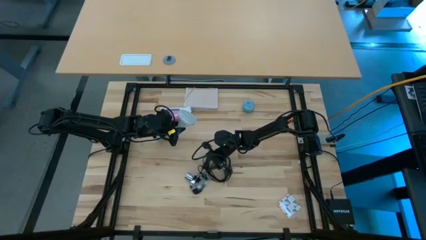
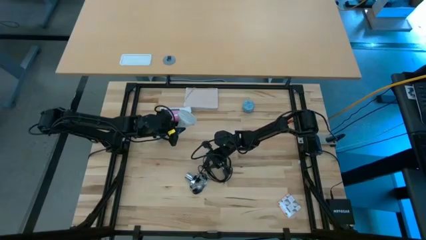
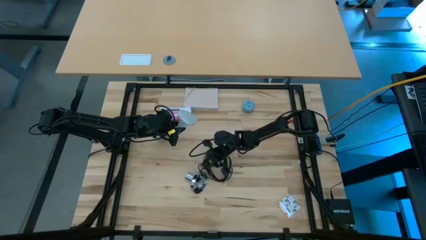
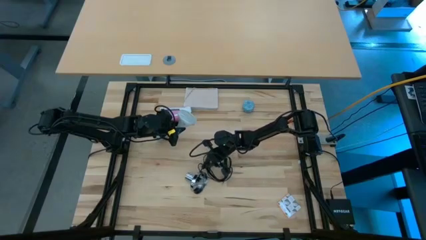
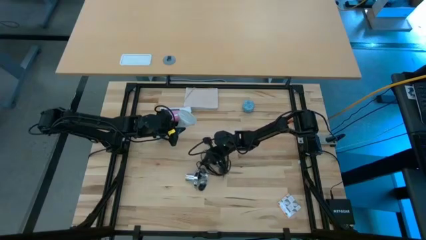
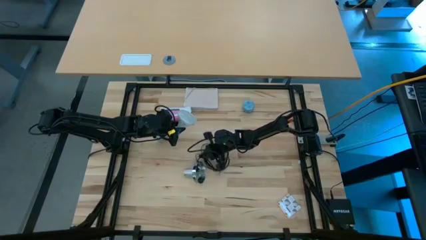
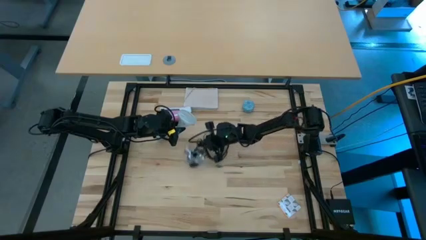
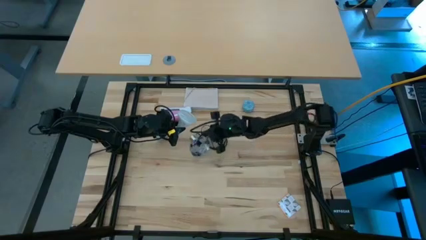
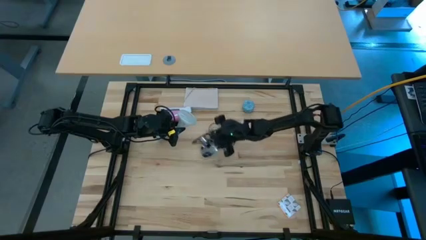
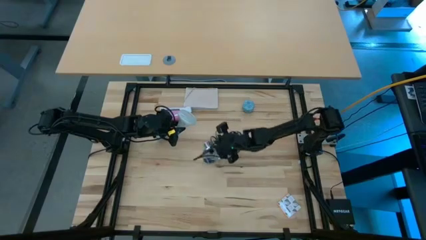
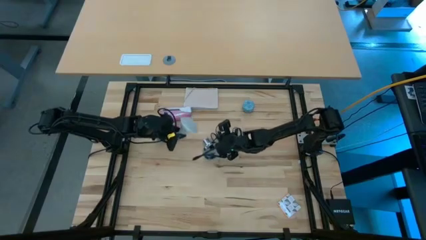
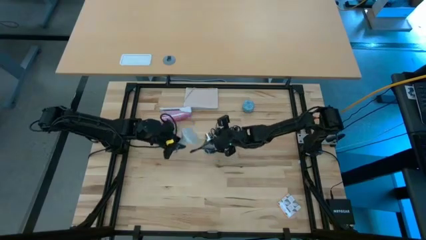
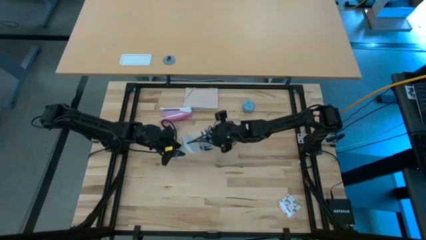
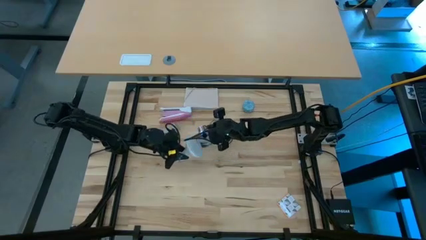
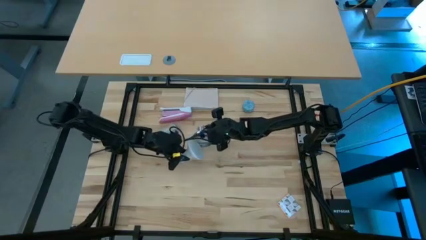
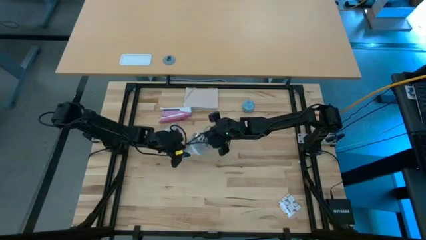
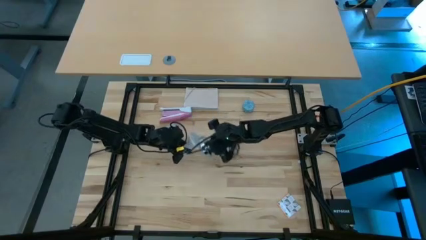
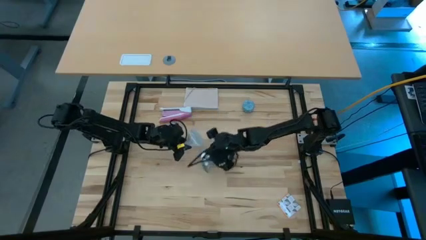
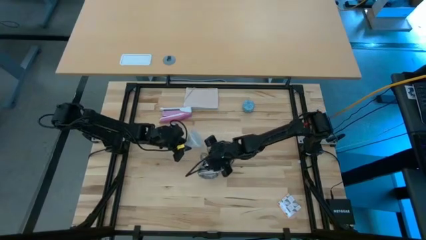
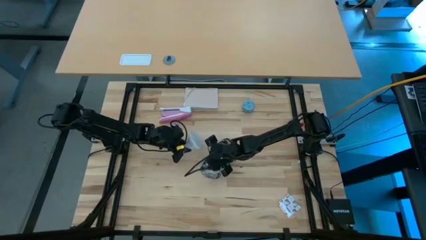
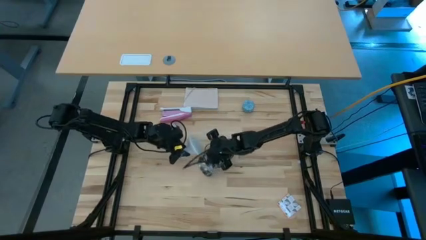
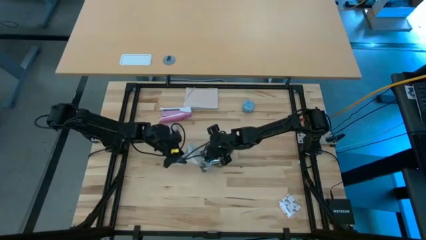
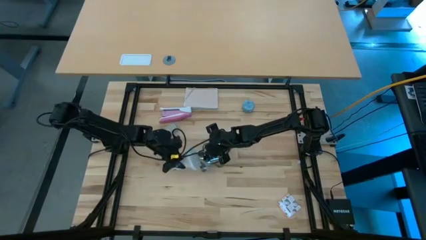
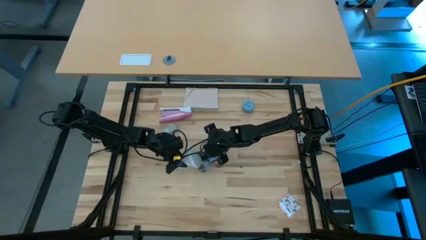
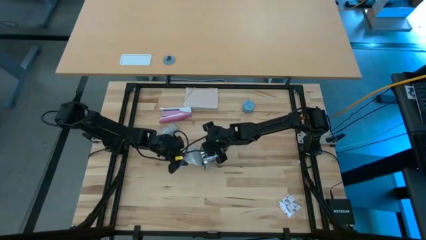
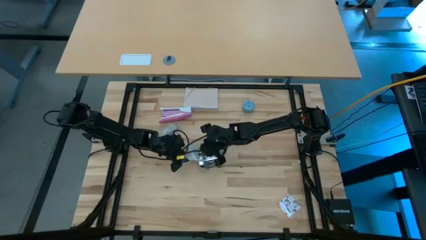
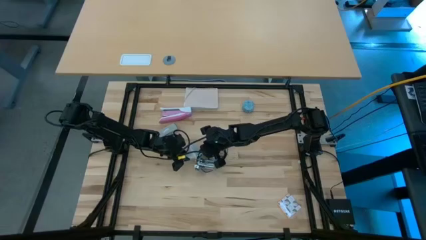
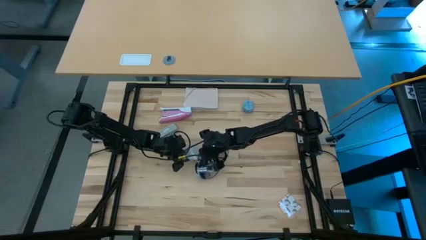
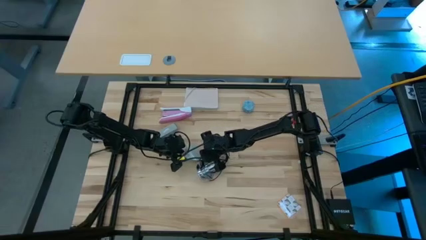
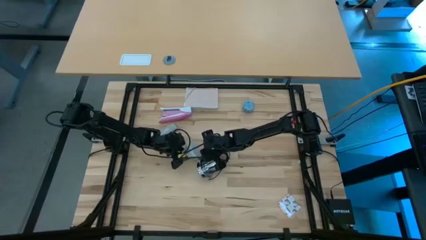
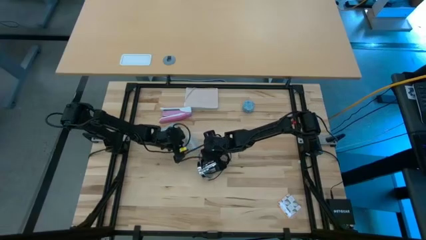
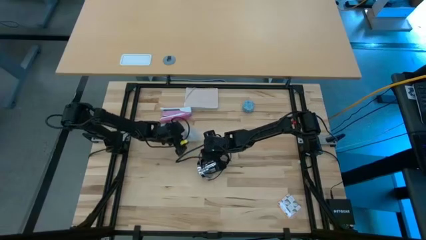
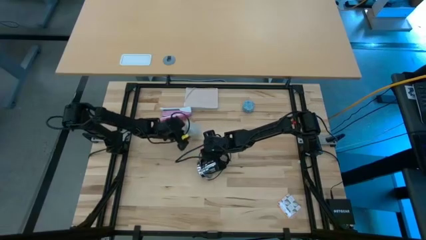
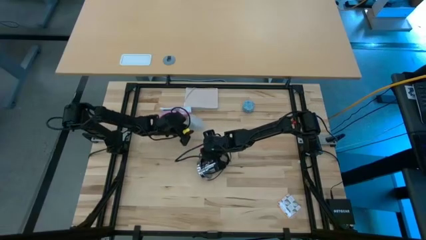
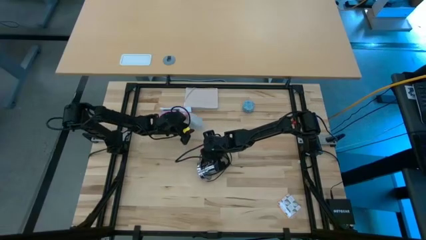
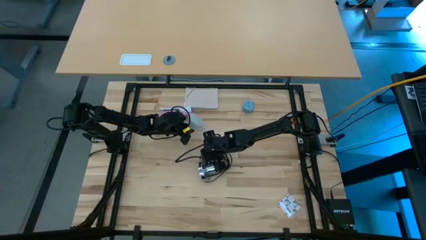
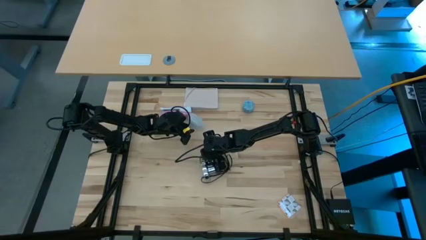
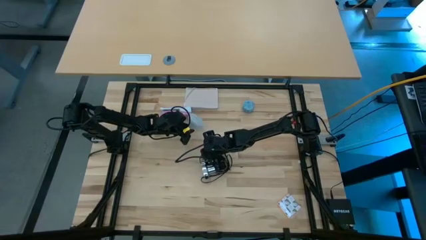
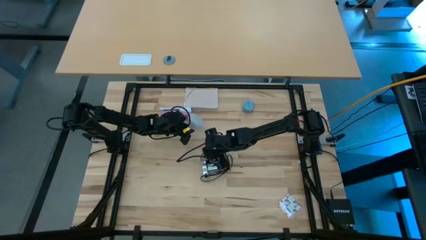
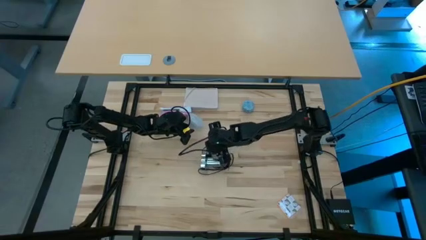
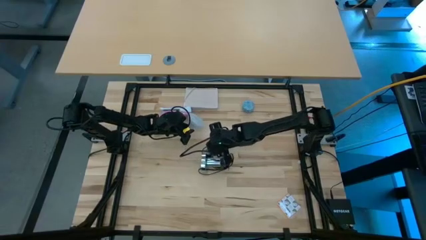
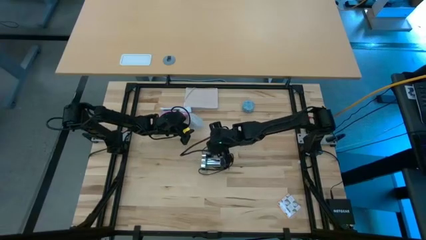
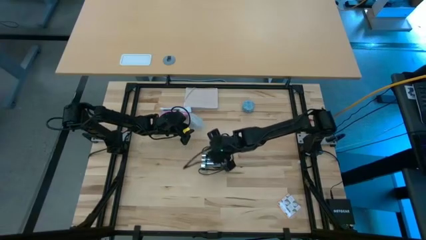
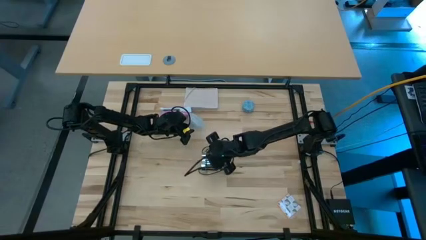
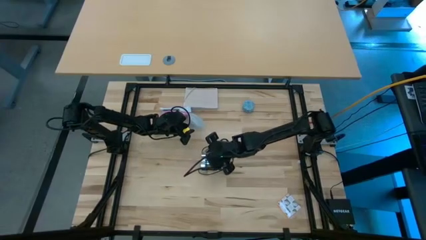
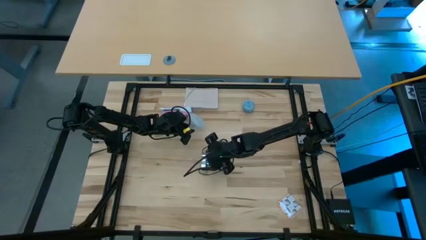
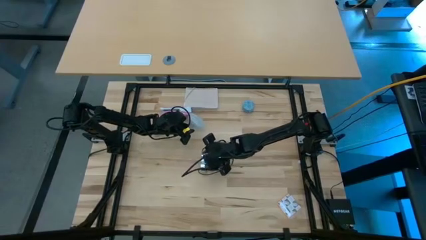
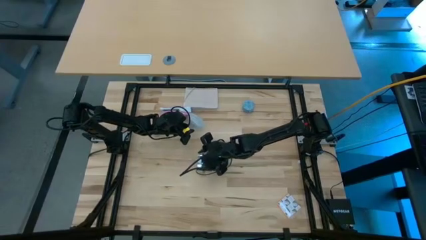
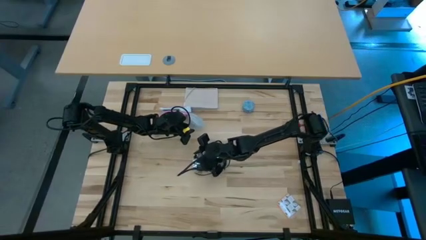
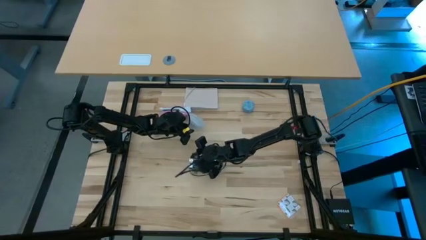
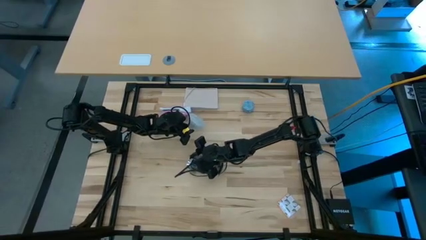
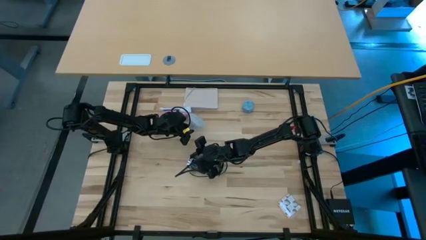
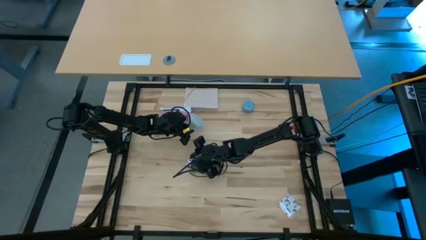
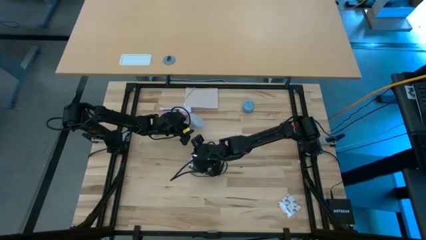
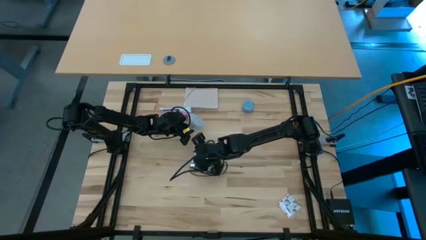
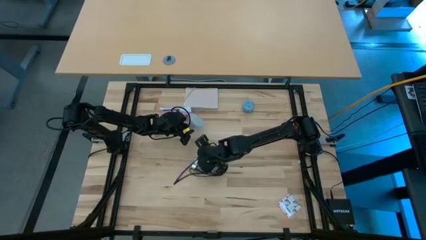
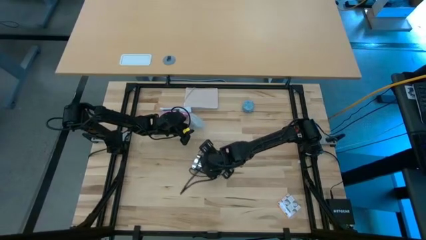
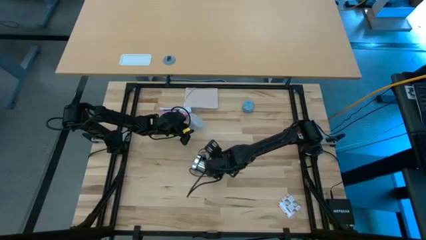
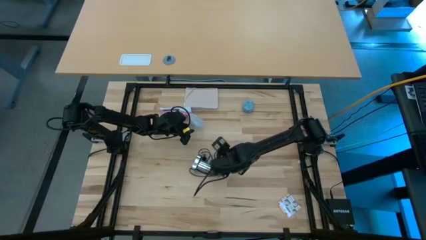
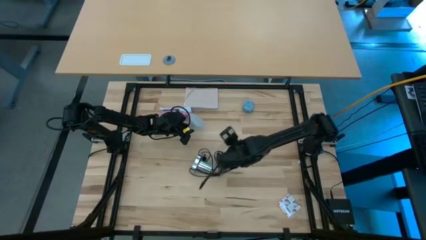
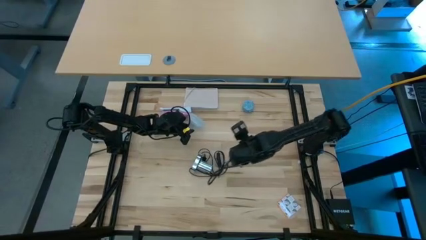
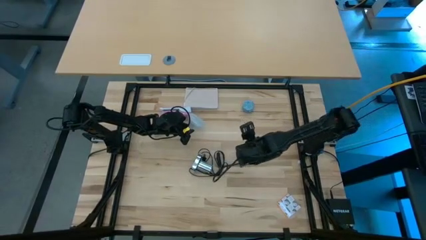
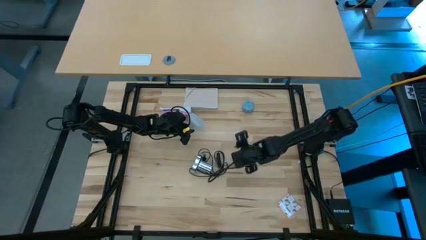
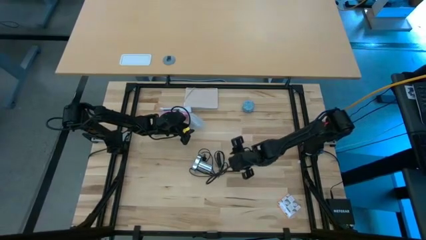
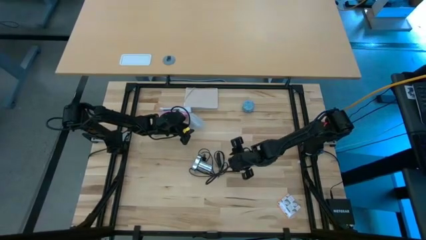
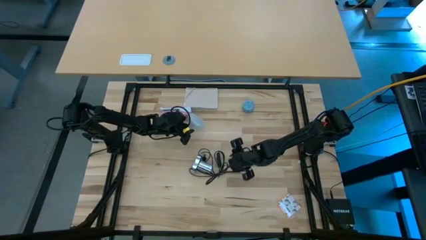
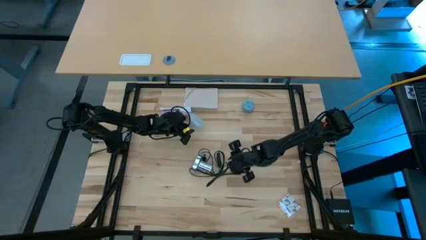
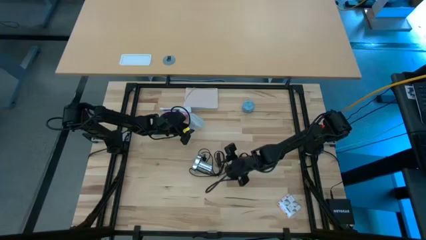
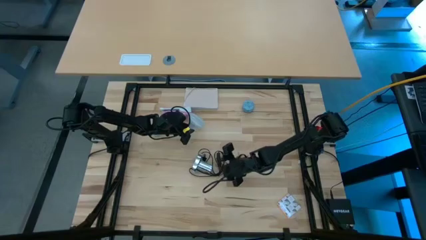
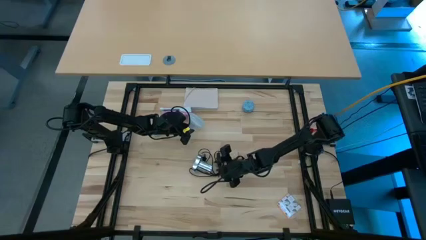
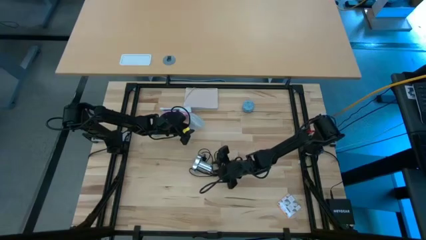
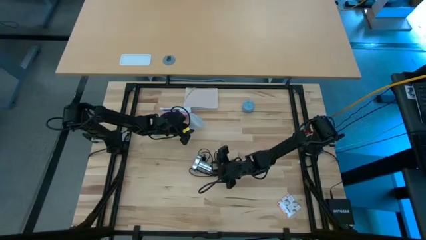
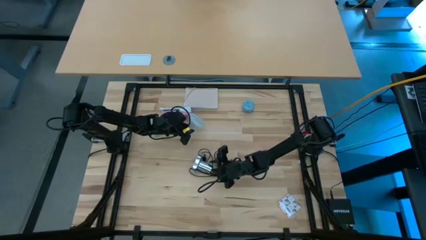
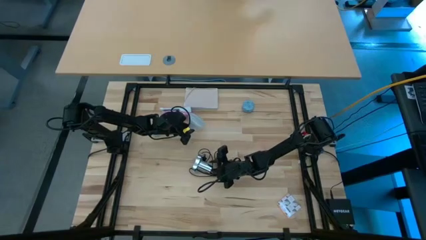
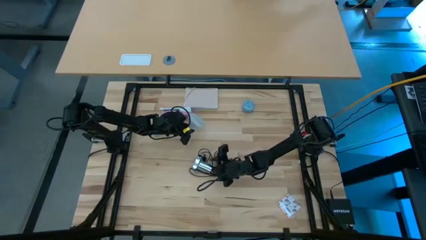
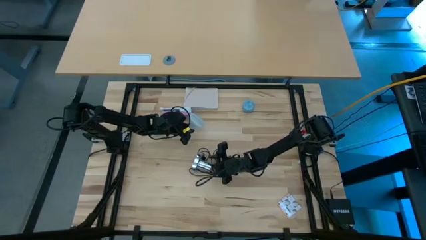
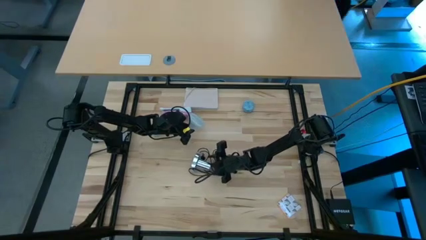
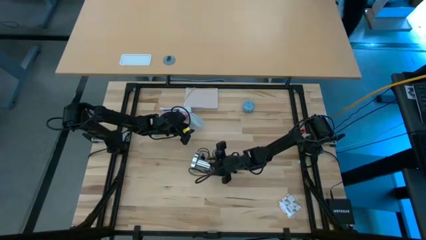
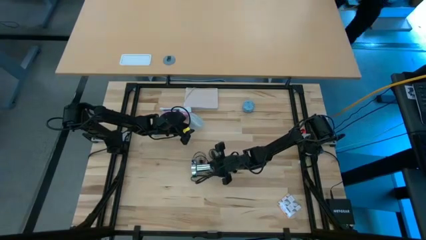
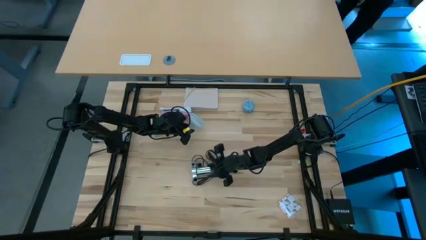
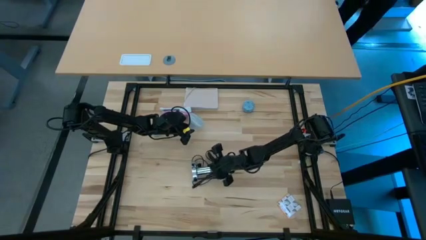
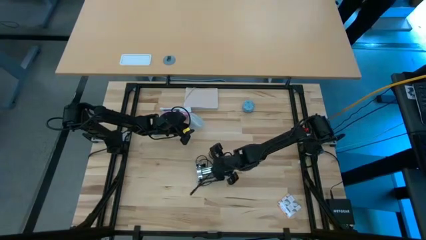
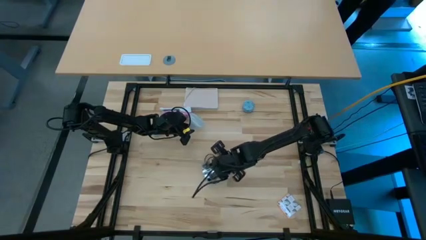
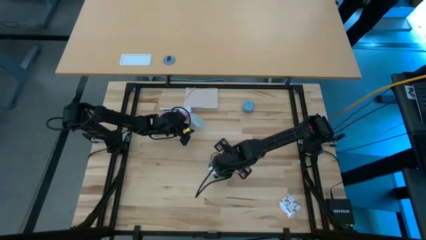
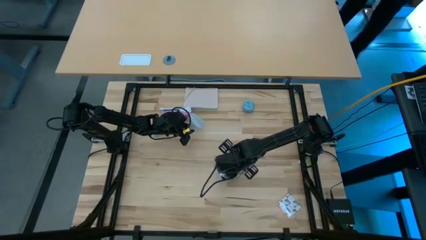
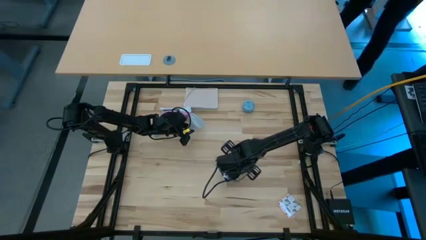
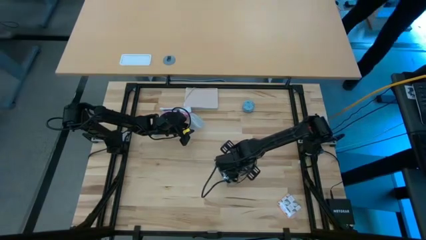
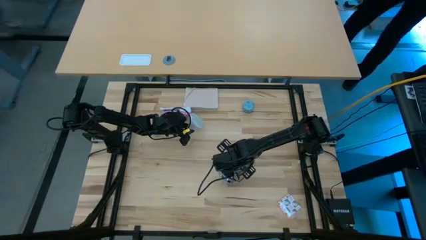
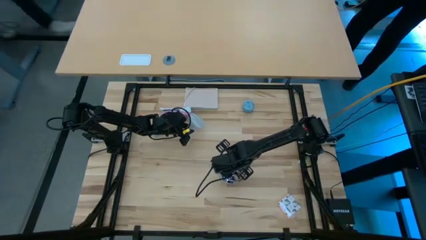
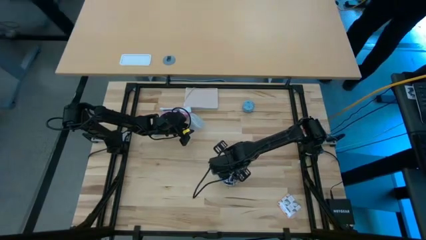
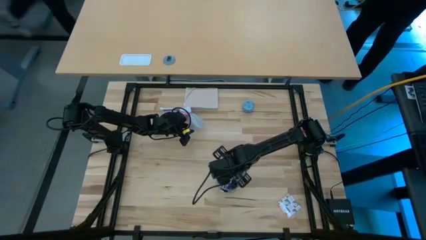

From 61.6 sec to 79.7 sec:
Task: Screw lightbulb
Insert the white lightbulb into the desk lamp
